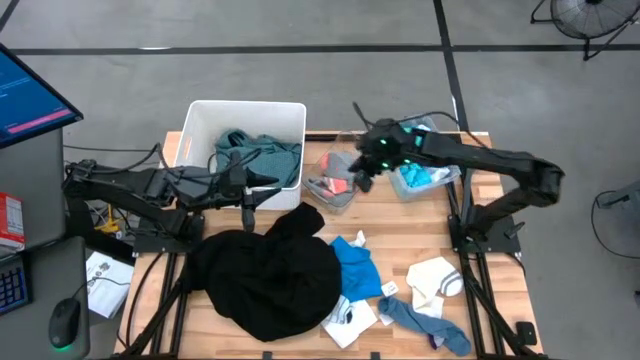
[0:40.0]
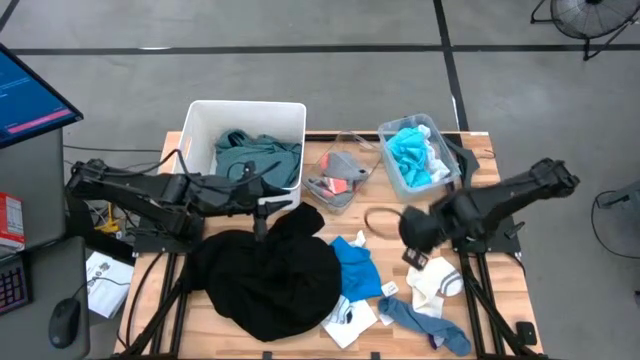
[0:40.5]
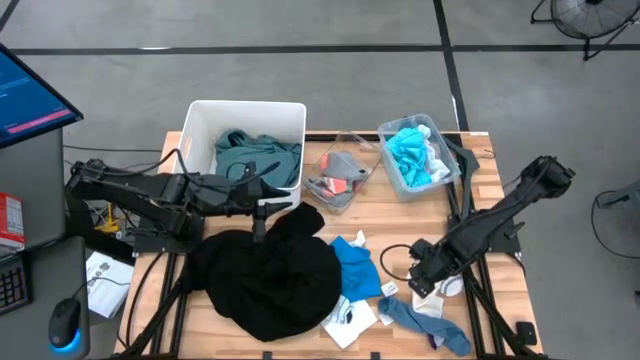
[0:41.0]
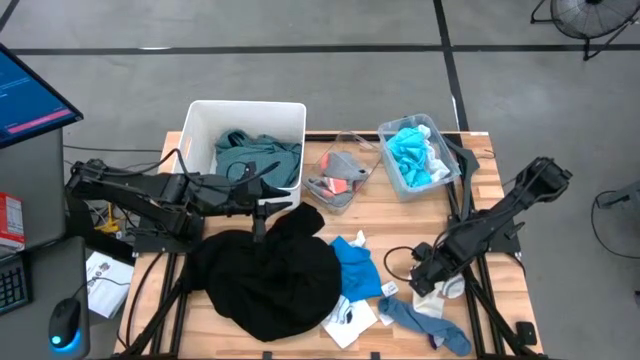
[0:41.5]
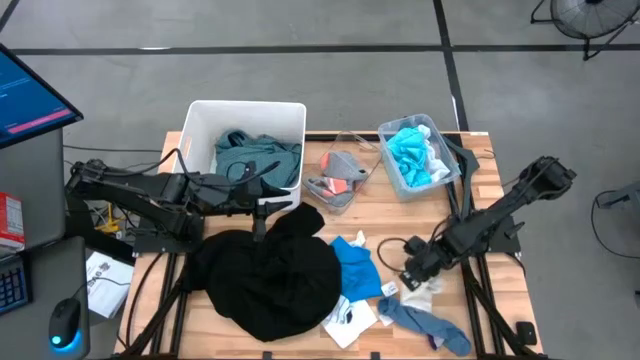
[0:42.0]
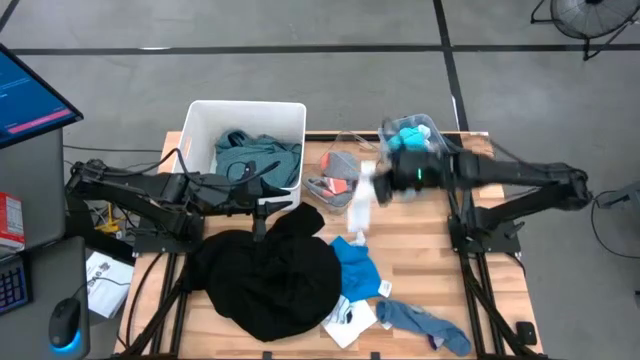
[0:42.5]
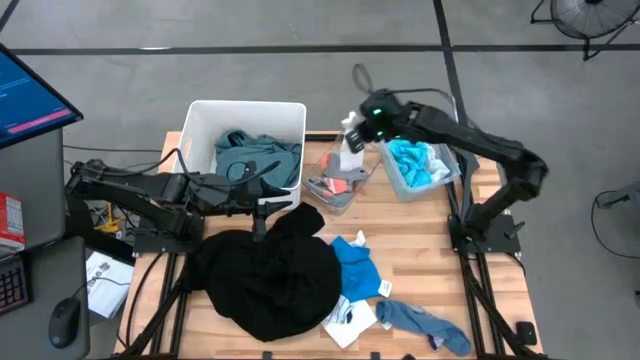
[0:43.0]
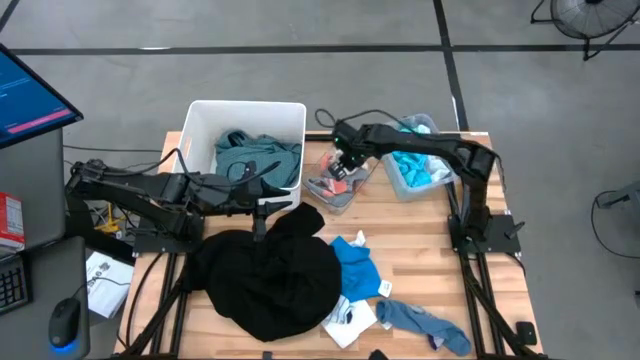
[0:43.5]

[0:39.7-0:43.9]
Task: Pick & Place Cloths
Put the white sock into the middle transparent bin

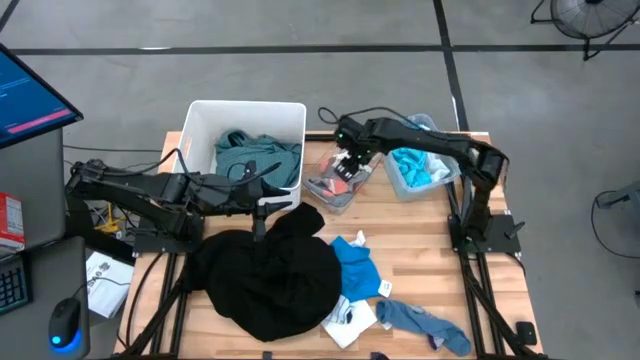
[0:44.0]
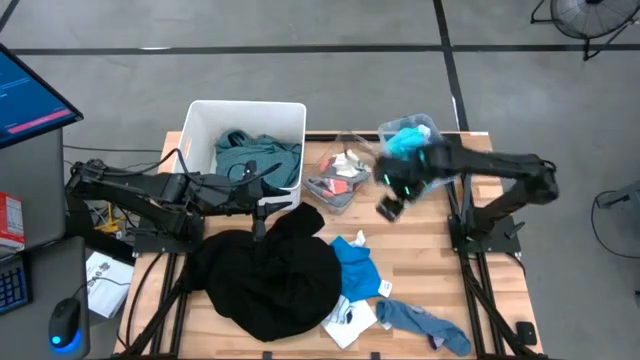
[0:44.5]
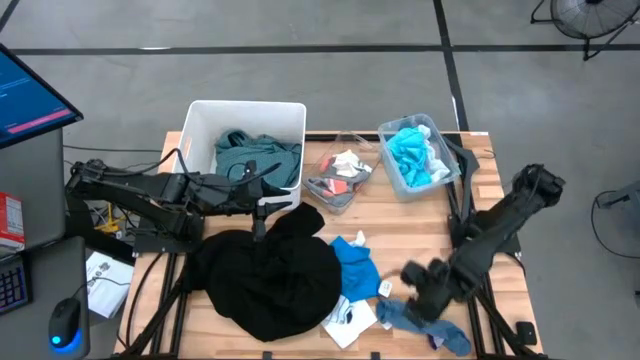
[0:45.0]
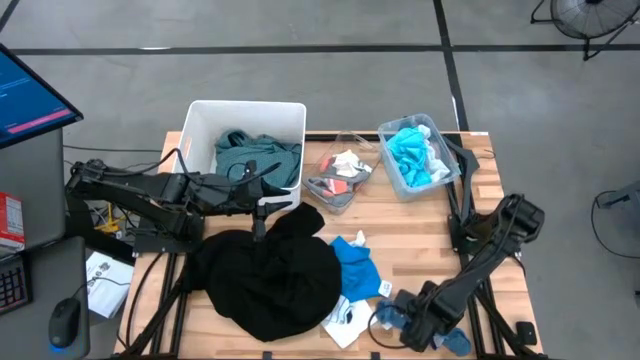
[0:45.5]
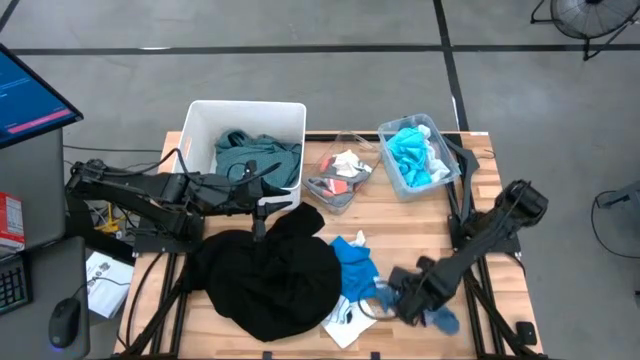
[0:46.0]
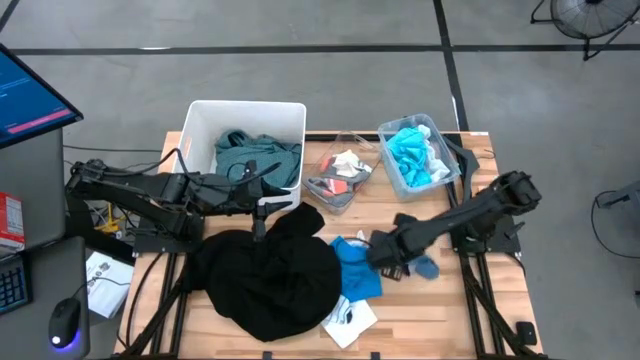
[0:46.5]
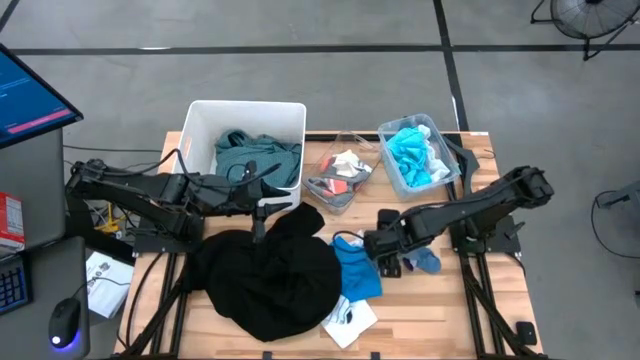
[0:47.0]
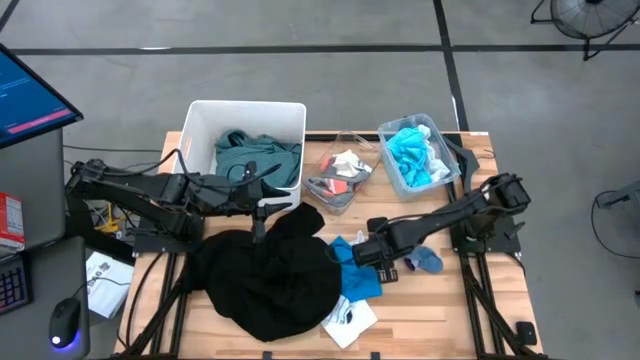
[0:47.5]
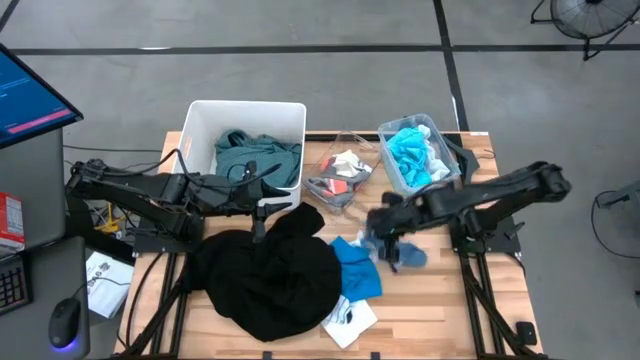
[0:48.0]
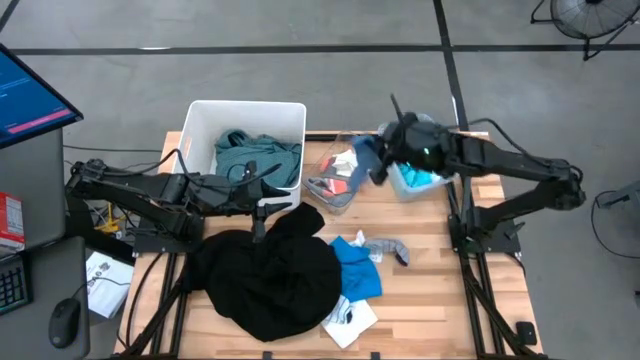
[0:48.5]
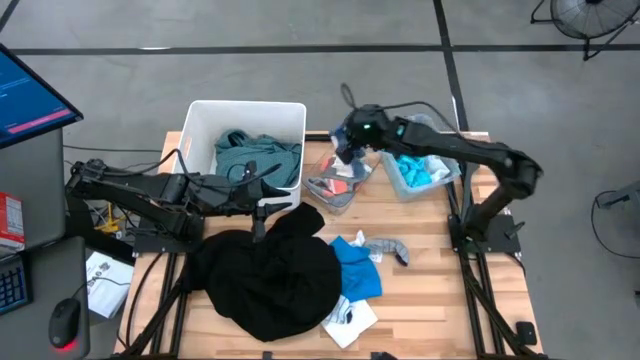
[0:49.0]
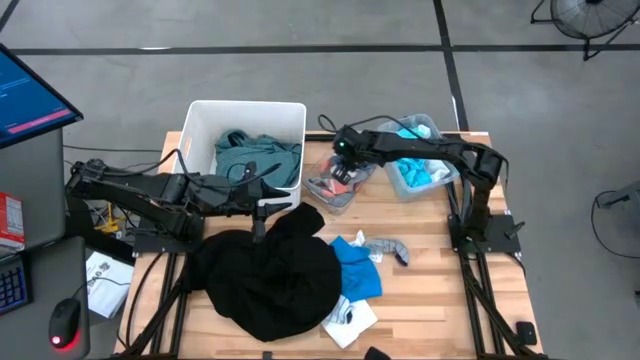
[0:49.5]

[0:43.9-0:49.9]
Put the dark blue sock into the middle transparent bin

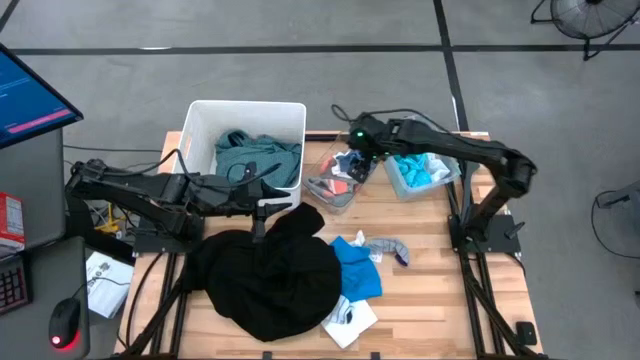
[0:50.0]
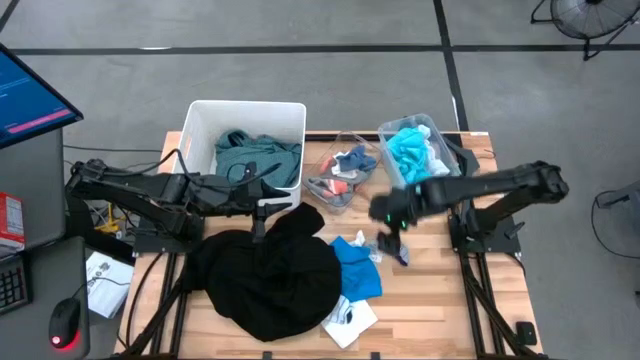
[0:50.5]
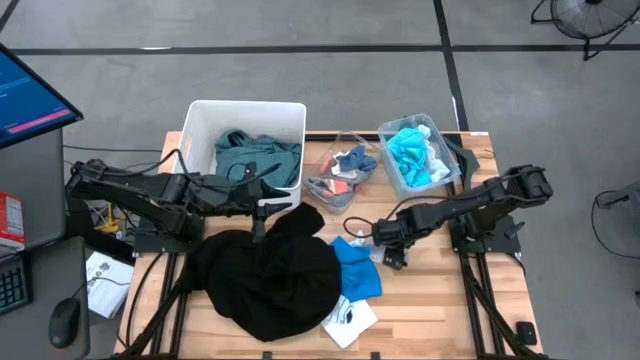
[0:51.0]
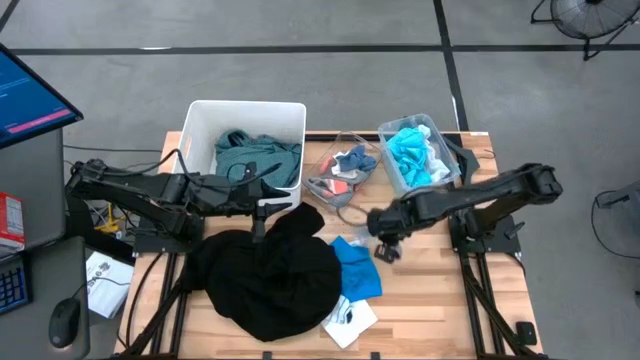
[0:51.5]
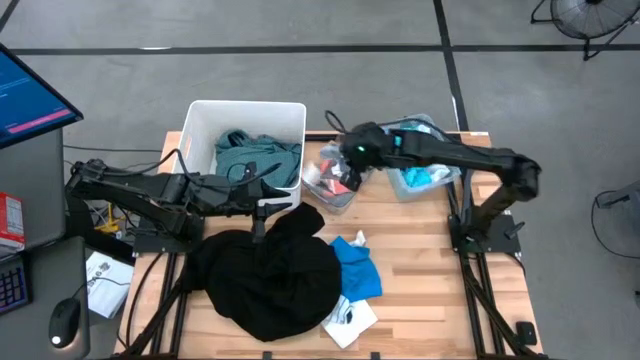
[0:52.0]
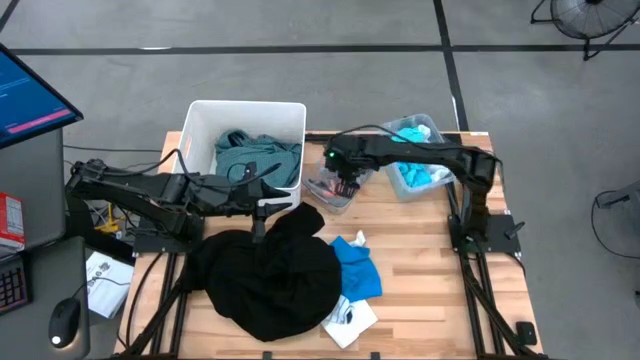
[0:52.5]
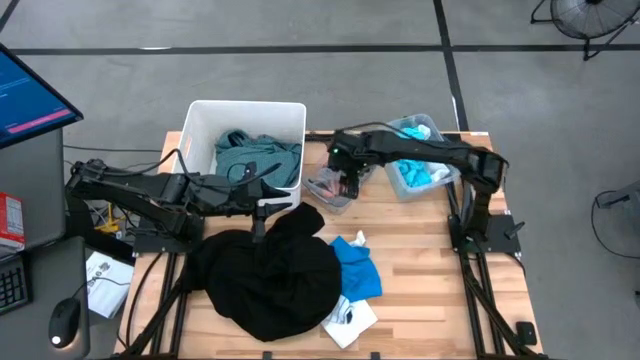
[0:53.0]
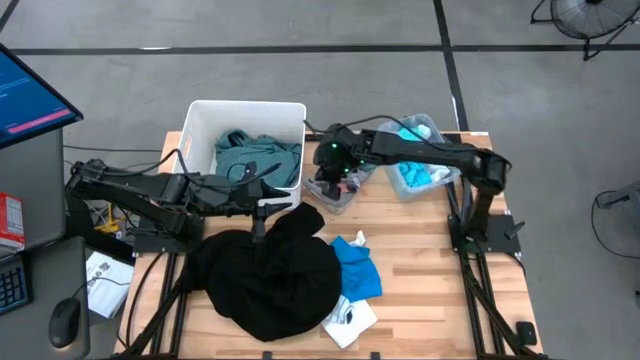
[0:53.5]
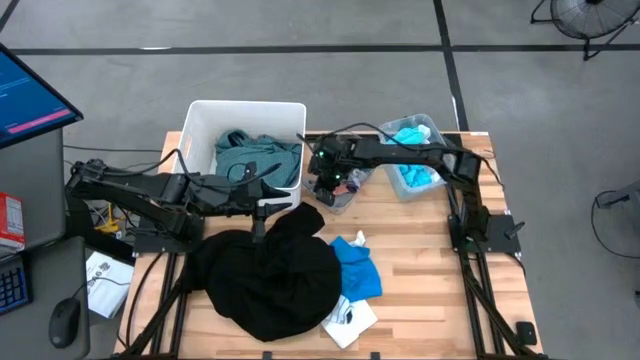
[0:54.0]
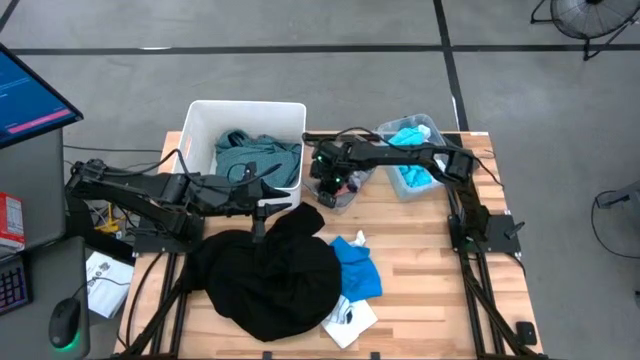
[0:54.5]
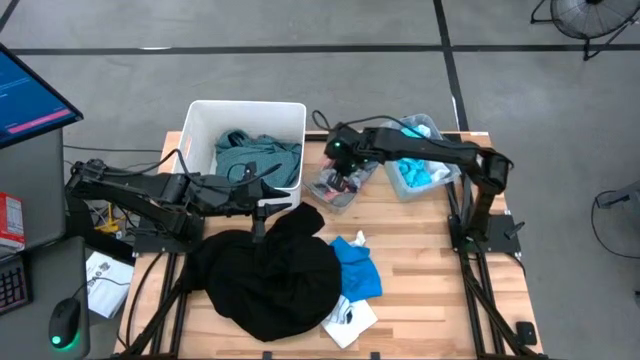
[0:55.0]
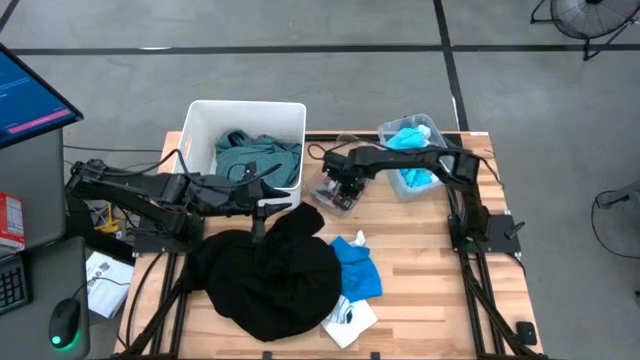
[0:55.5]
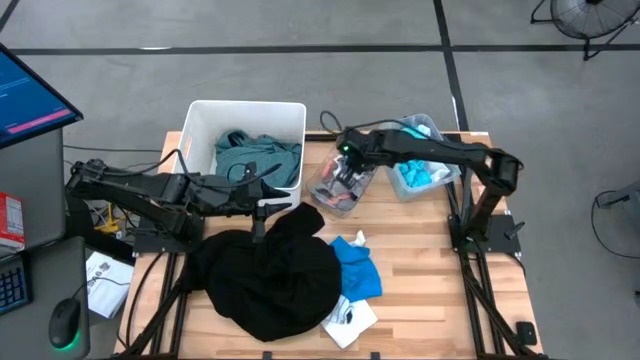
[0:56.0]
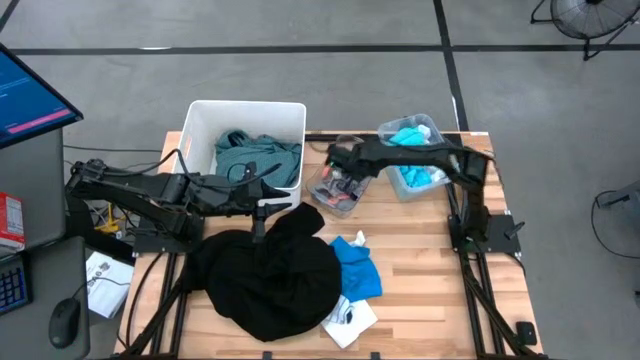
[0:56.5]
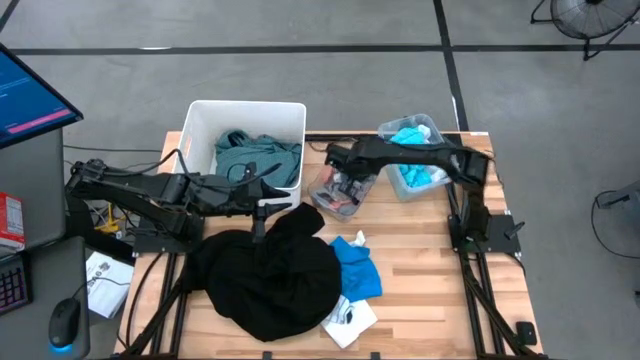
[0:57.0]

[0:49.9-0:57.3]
Put the gray sock into the middle transparent bin

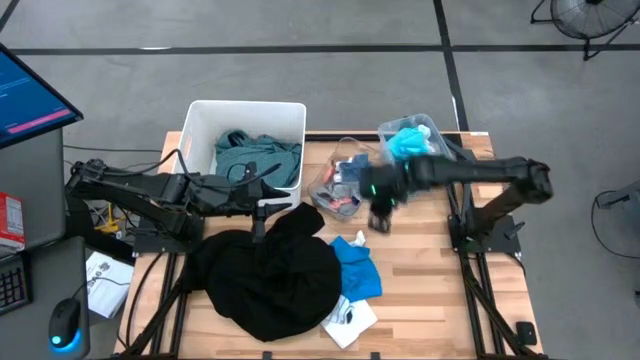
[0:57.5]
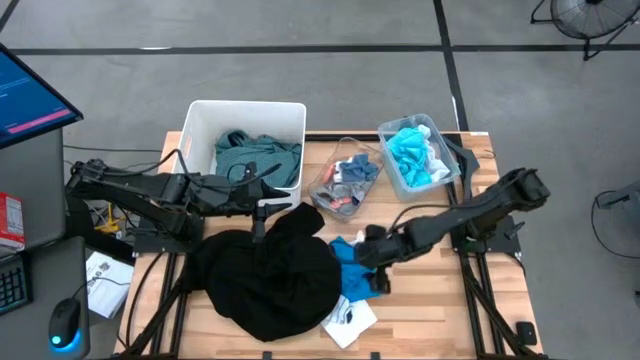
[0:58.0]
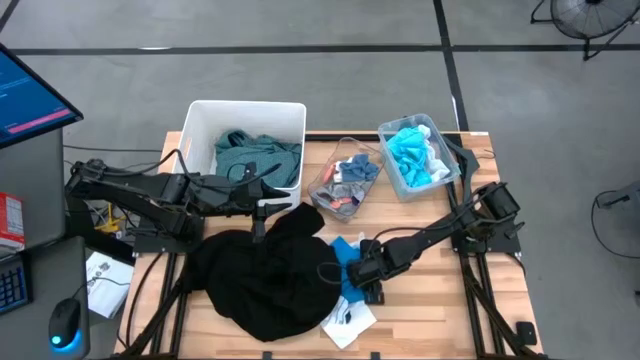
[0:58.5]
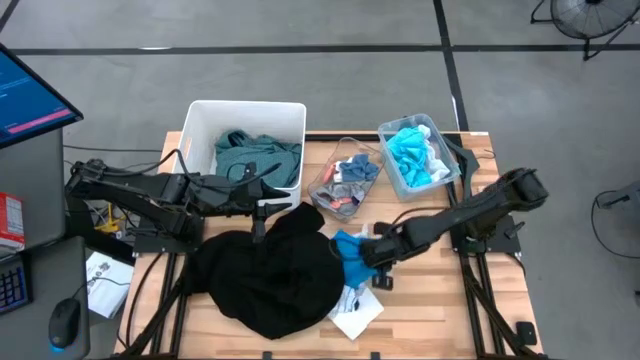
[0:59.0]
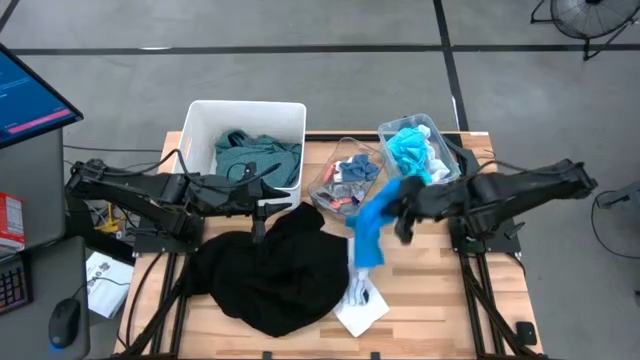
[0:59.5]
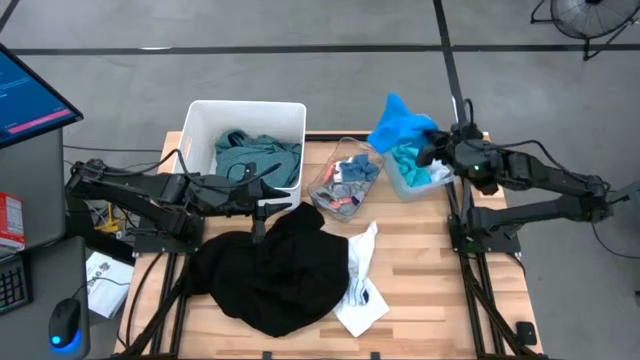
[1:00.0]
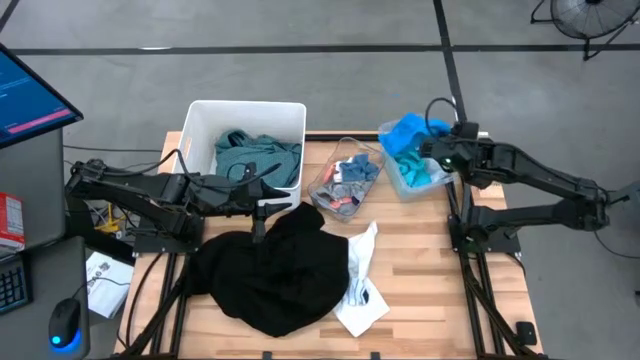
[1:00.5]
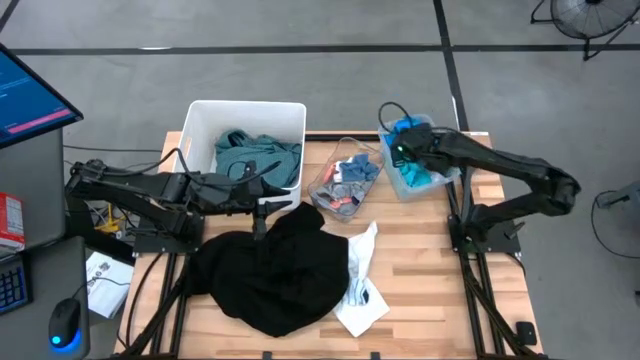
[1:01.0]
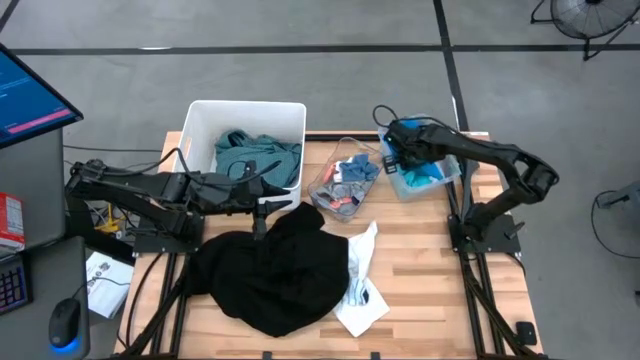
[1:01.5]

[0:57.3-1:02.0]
Put the blue pants into the right transparent bin
